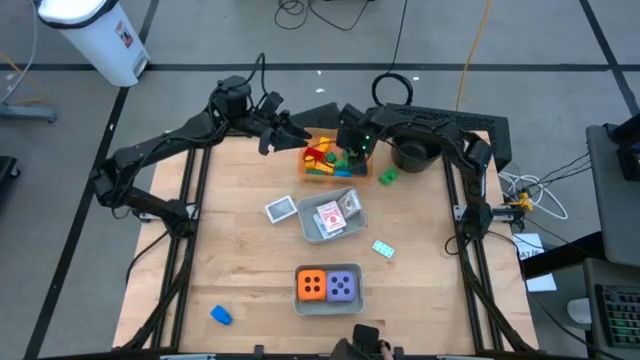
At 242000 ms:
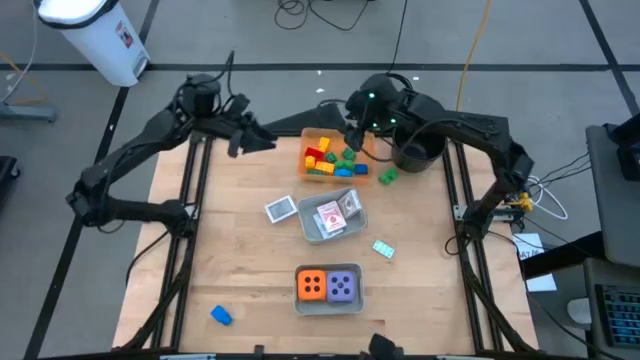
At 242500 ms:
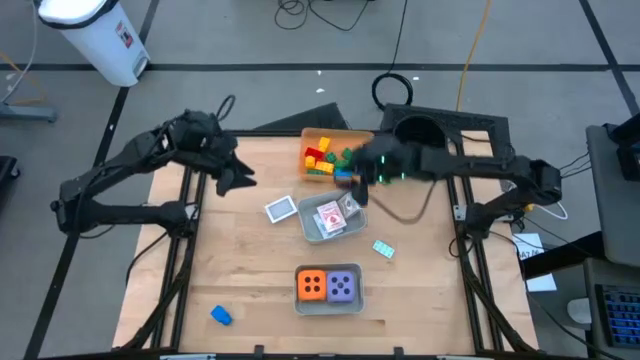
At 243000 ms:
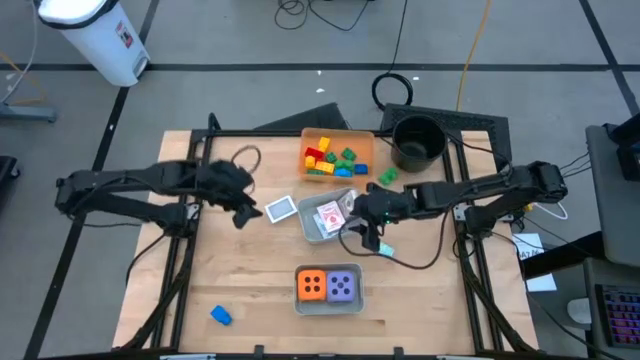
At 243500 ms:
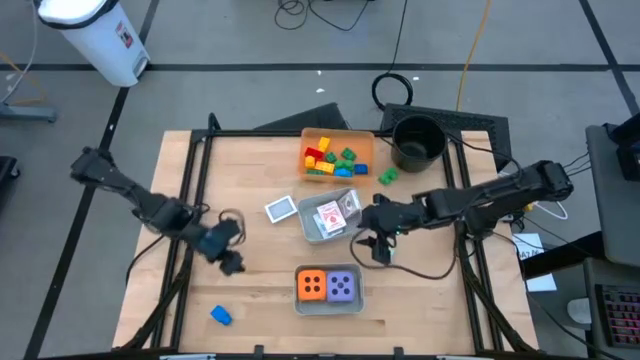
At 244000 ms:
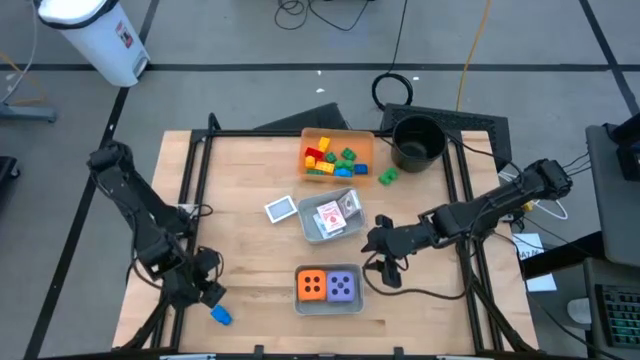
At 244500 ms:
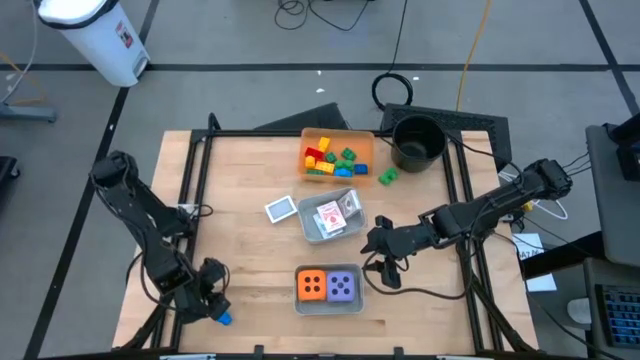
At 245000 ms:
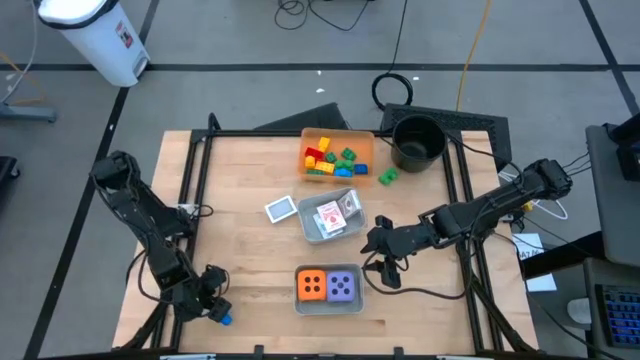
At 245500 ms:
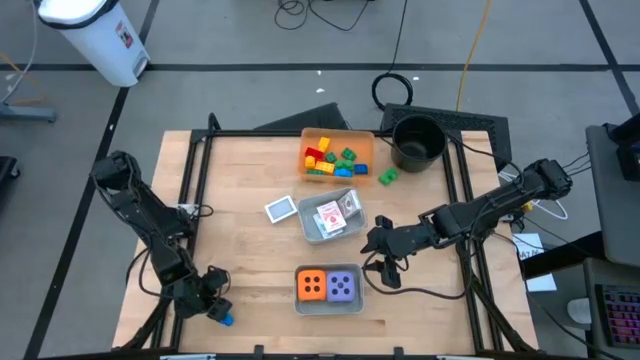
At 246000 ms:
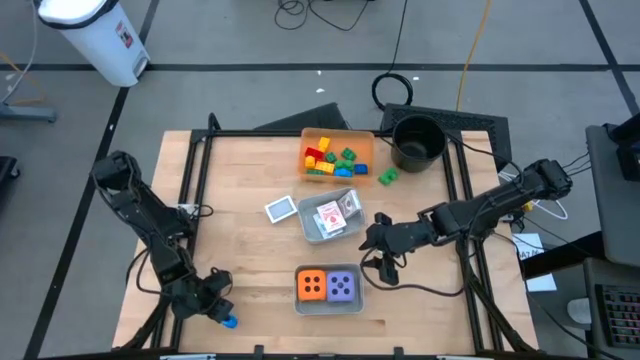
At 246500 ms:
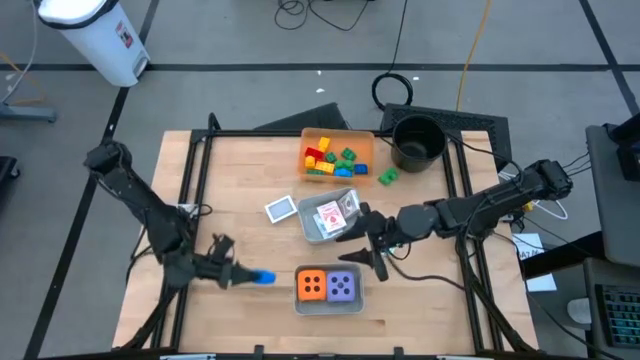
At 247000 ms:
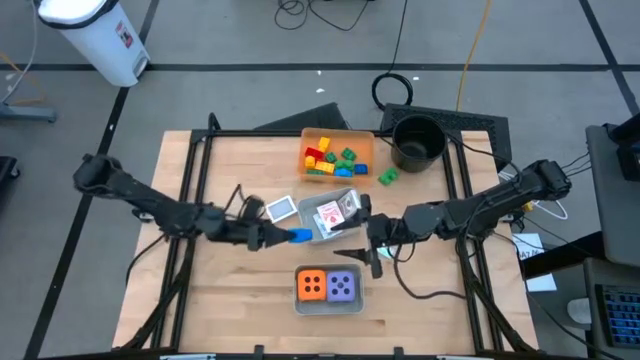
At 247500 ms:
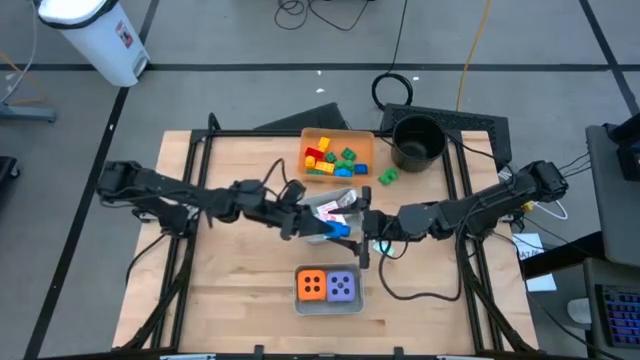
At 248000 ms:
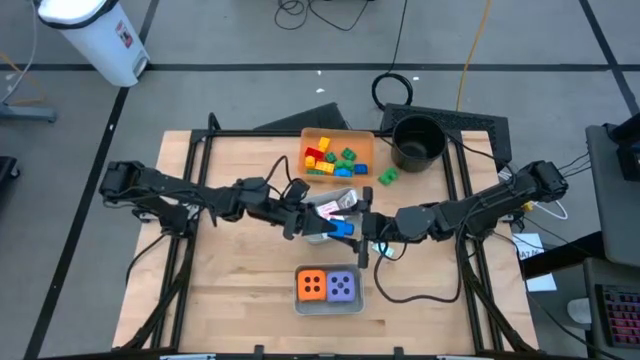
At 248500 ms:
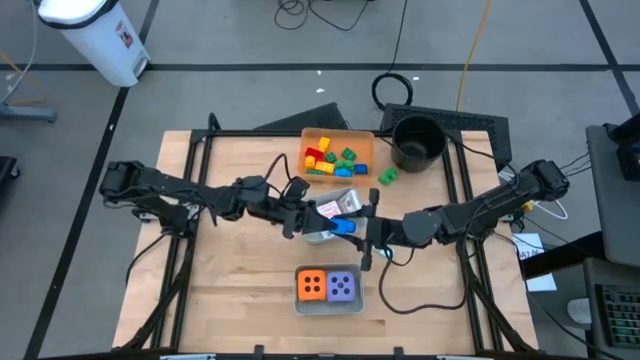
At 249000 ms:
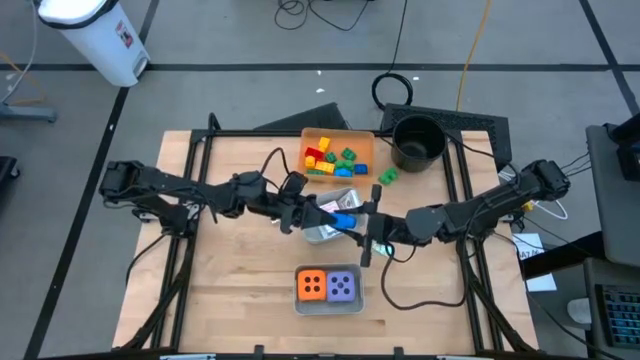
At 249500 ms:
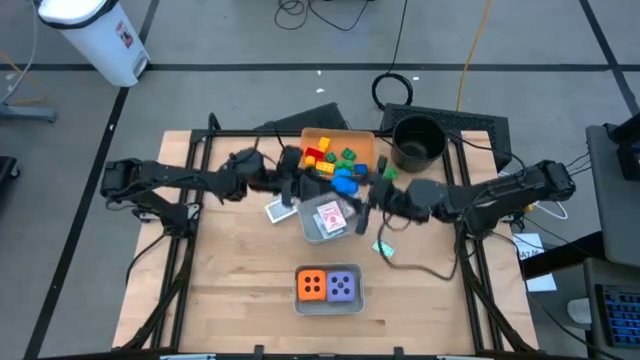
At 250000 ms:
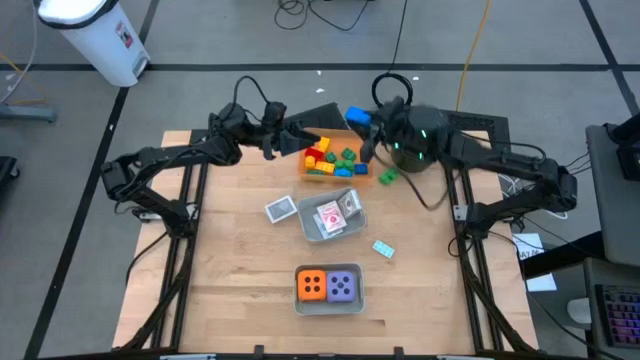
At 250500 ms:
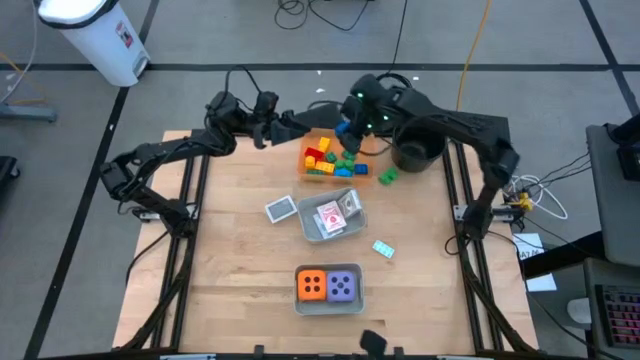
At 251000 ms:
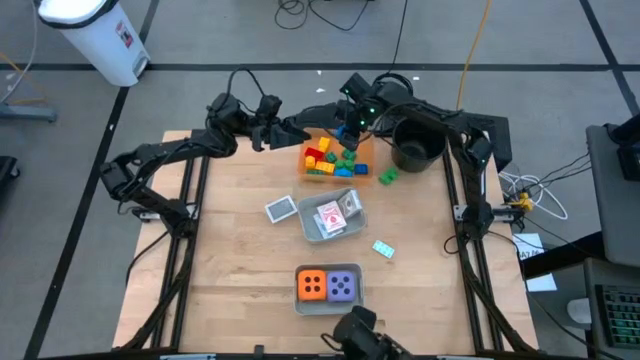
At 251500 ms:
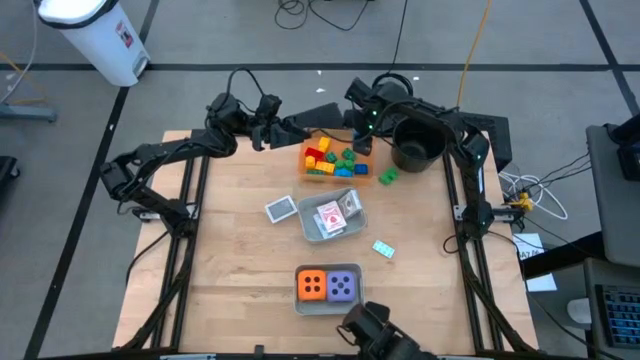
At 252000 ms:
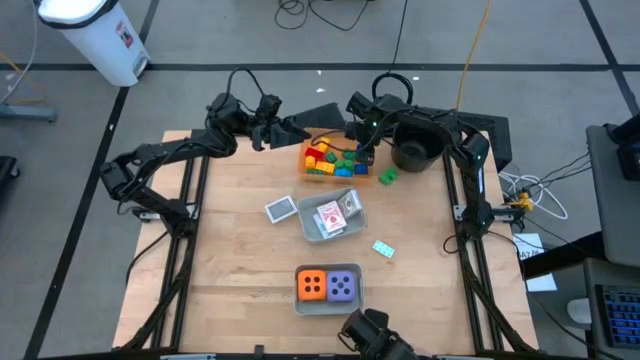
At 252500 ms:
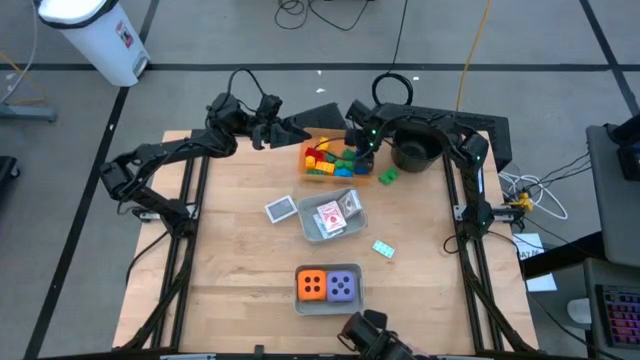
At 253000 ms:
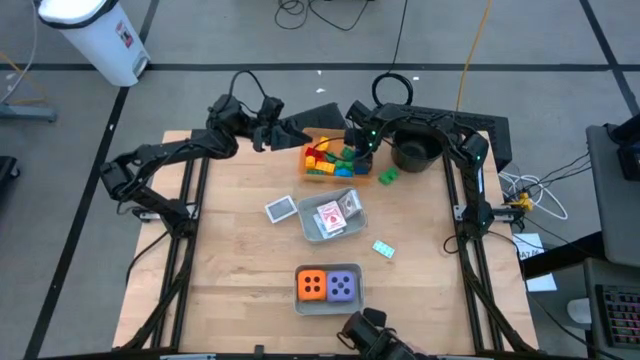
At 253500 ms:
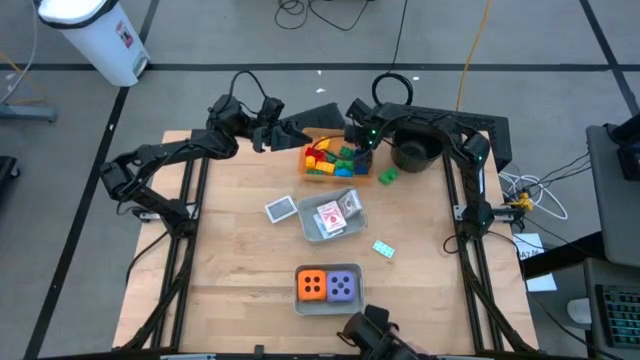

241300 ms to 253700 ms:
Task: Pick & Place Toys
Put the blue game piece into the orange bin

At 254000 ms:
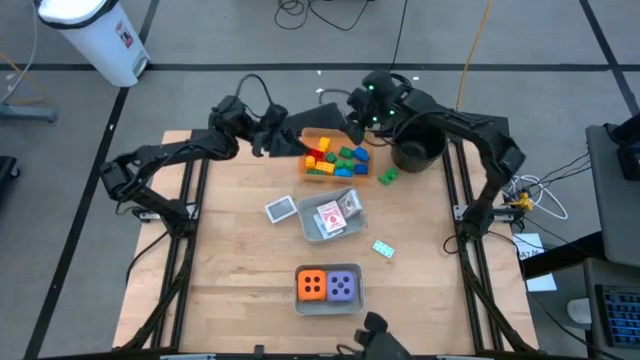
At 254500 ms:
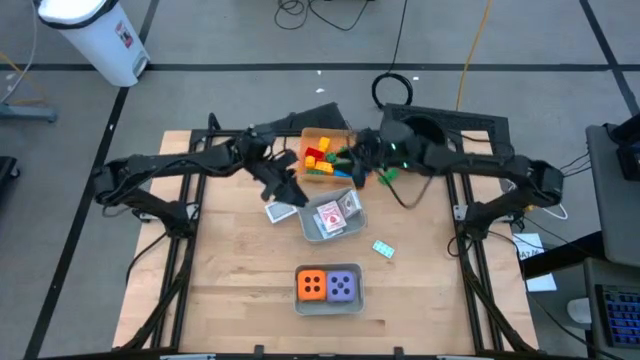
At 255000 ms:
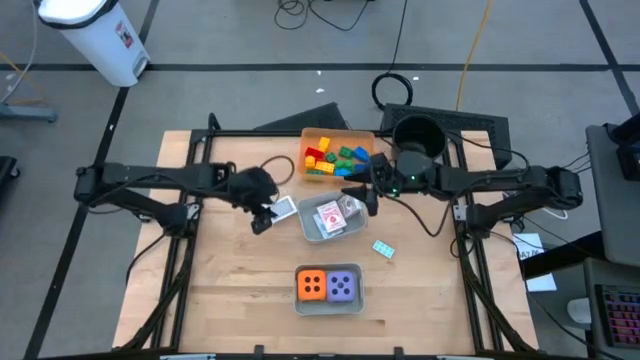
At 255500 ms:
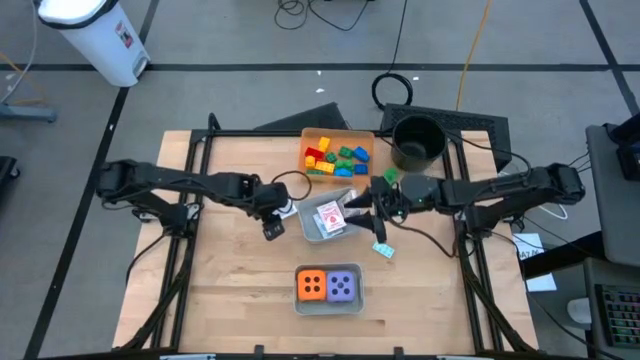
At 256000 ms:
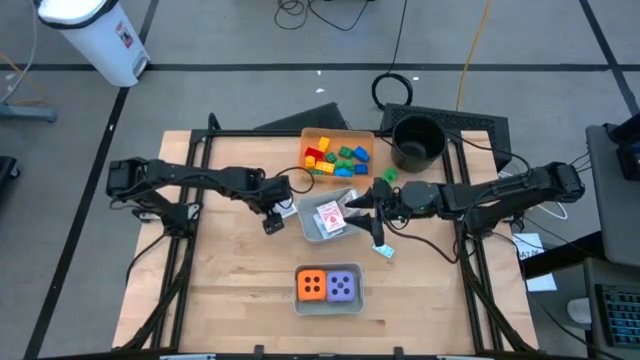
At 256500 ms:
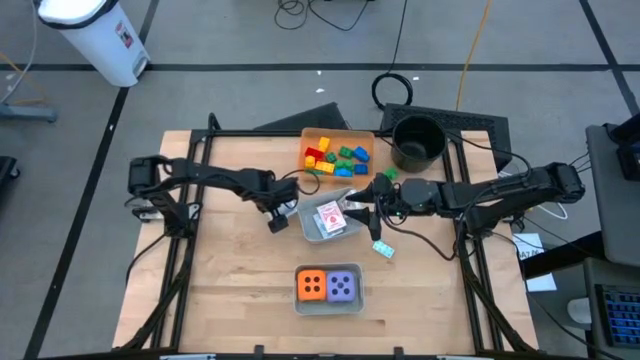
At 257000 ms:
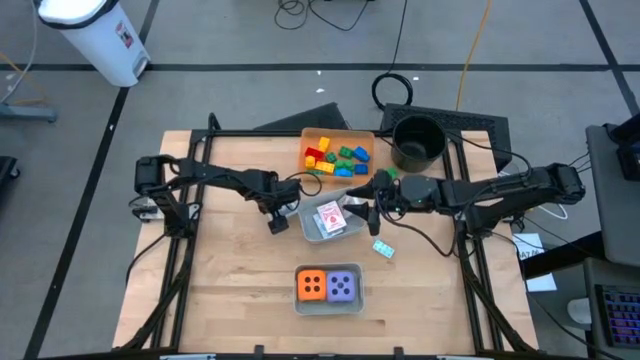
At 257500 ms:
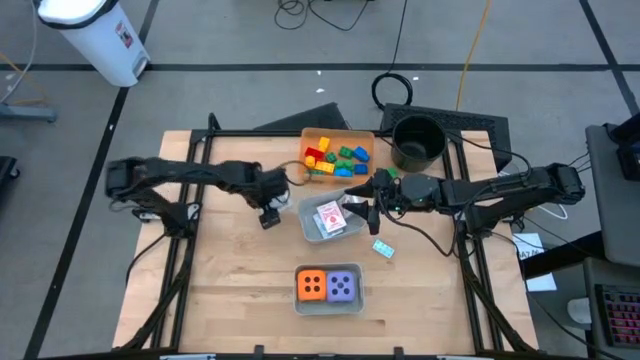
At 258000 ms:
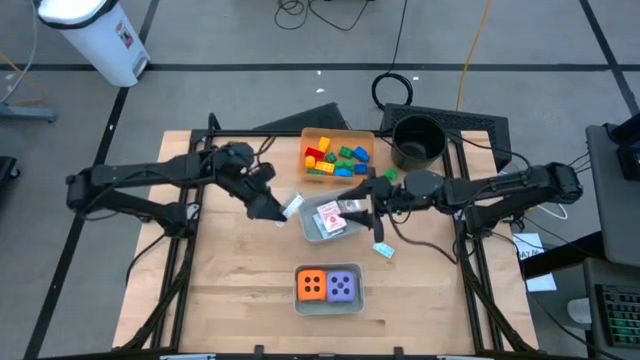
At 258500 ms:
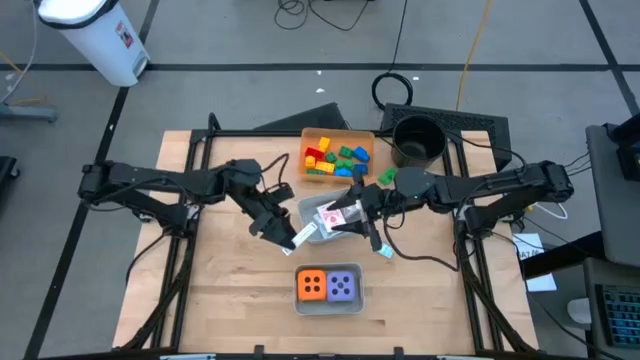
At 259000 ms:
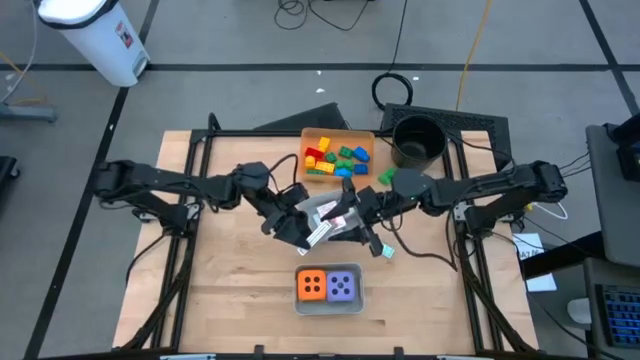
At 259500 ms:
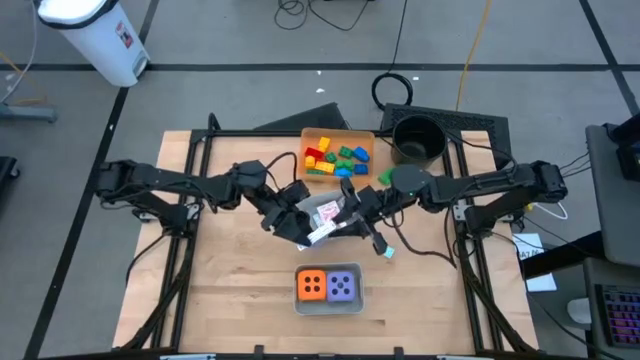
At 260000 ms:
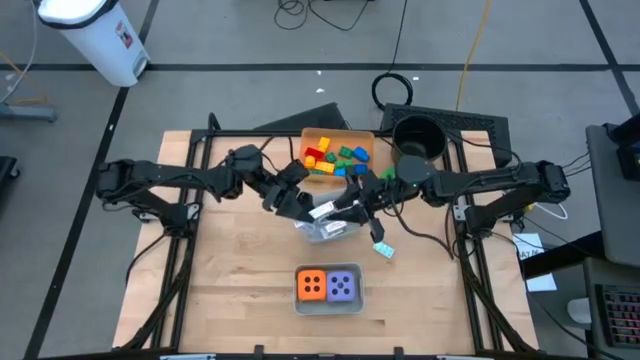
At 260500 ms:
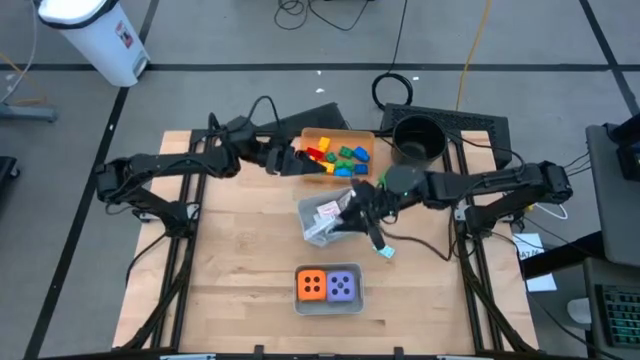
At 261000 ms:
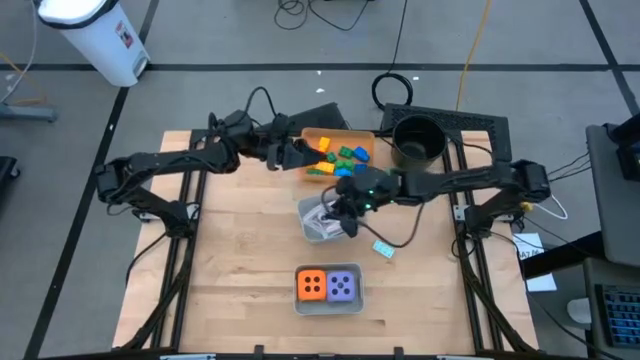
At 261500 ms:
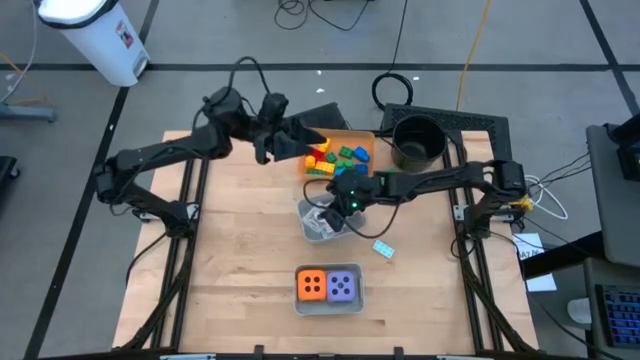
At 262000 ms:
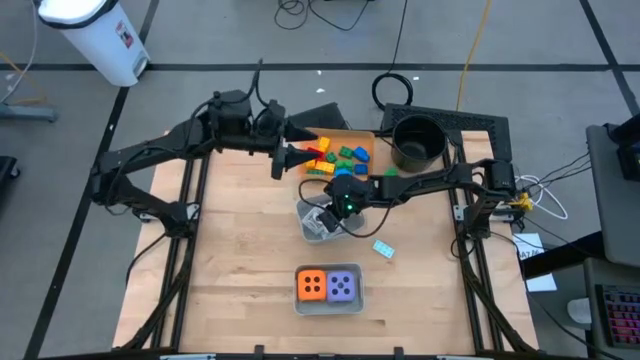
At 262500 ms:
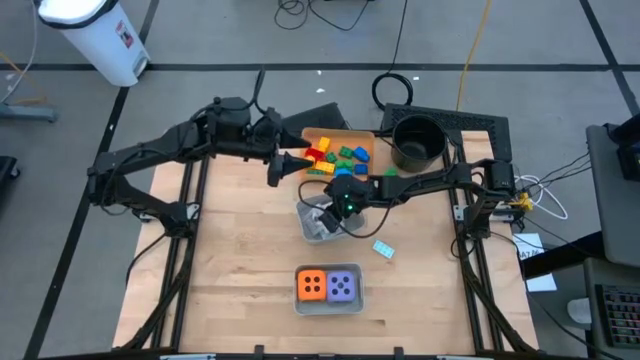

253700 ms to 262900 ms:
Put the black deck of cards into the top gray bin
